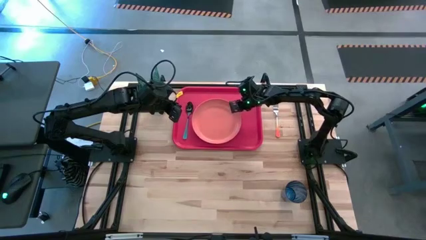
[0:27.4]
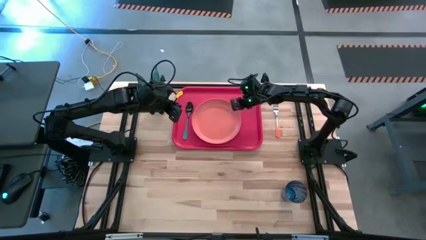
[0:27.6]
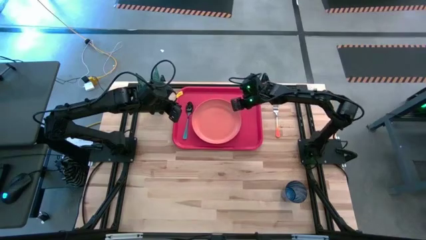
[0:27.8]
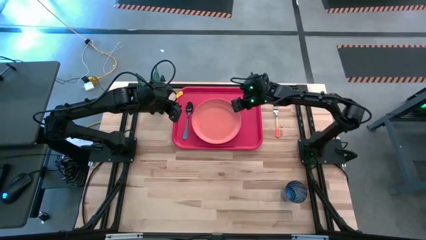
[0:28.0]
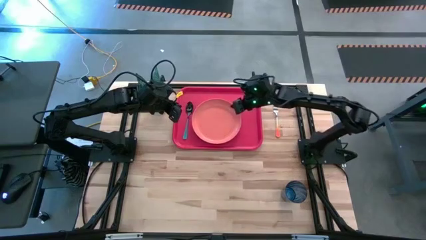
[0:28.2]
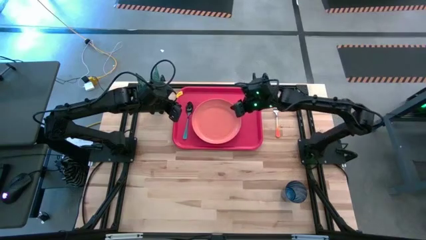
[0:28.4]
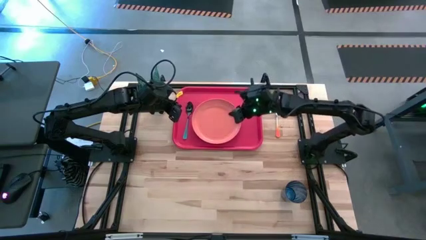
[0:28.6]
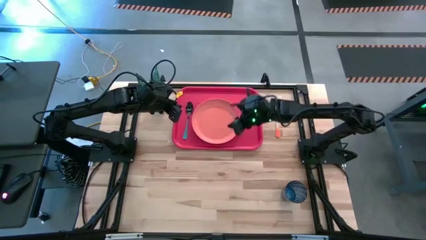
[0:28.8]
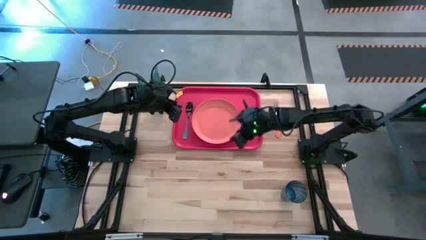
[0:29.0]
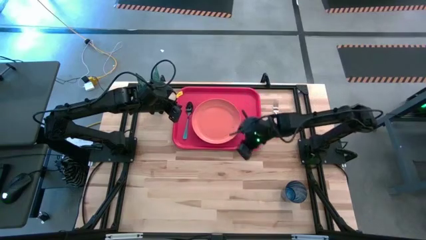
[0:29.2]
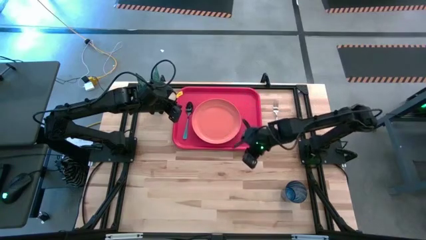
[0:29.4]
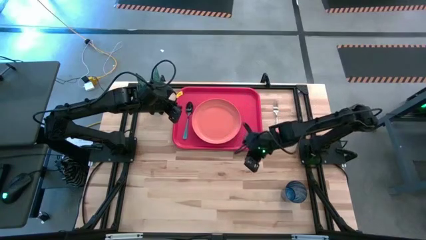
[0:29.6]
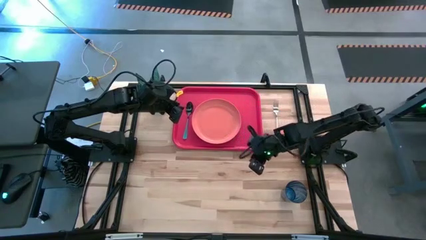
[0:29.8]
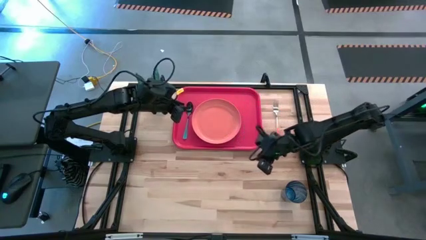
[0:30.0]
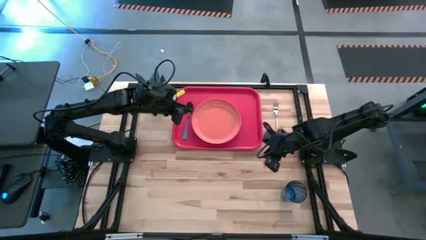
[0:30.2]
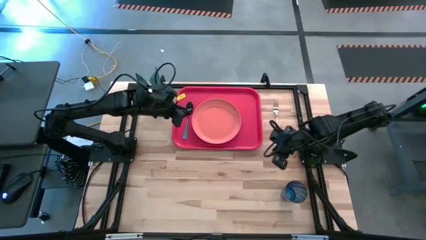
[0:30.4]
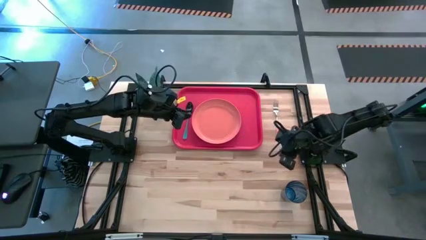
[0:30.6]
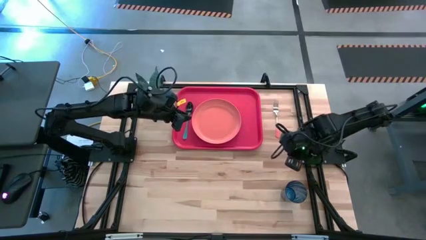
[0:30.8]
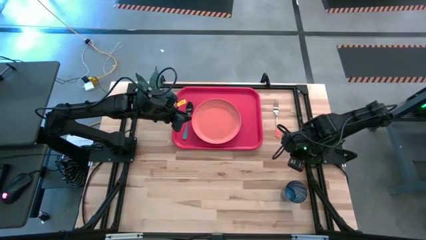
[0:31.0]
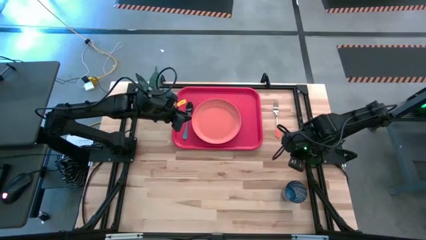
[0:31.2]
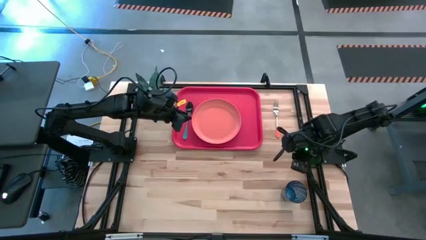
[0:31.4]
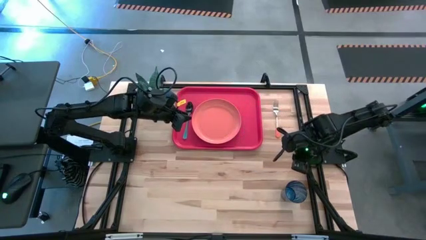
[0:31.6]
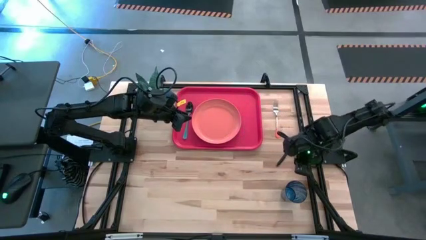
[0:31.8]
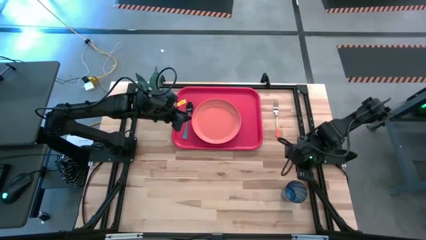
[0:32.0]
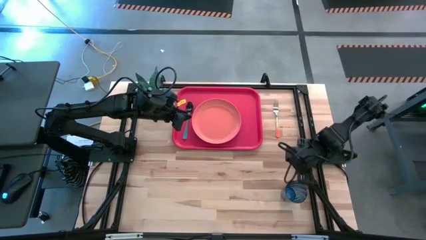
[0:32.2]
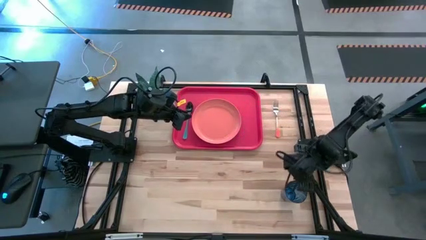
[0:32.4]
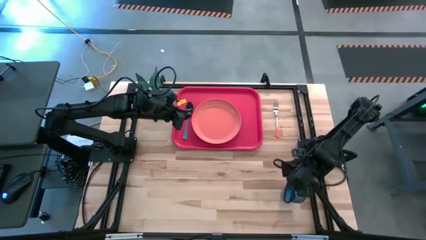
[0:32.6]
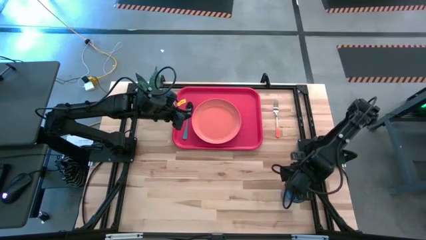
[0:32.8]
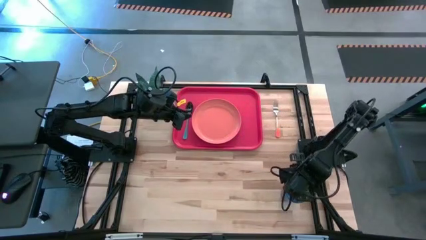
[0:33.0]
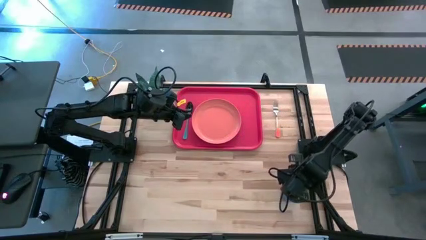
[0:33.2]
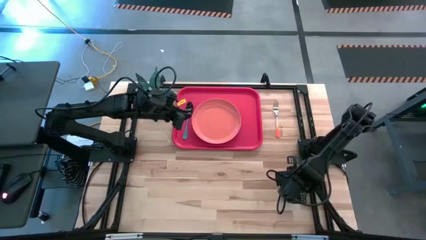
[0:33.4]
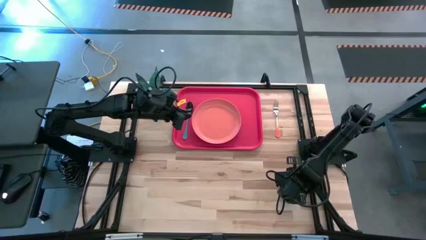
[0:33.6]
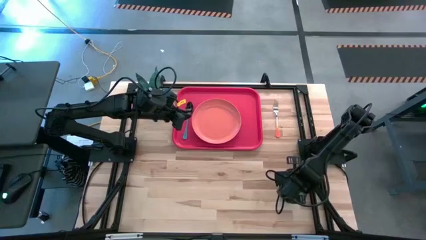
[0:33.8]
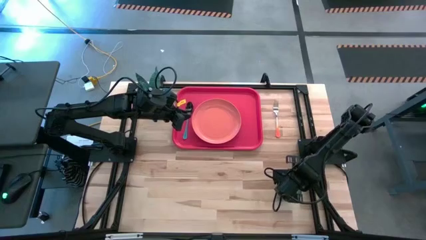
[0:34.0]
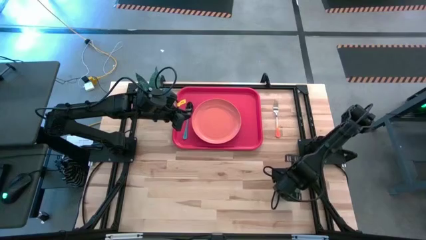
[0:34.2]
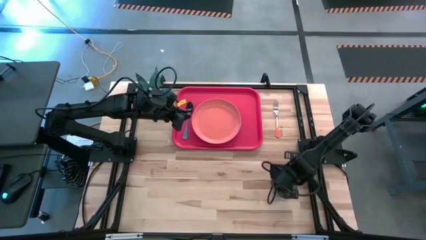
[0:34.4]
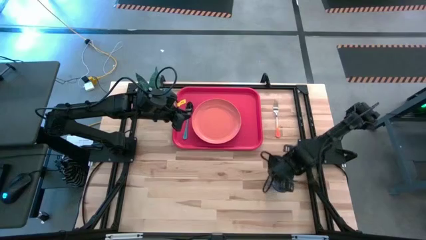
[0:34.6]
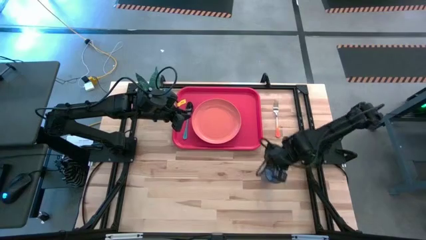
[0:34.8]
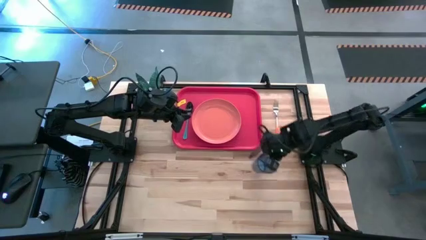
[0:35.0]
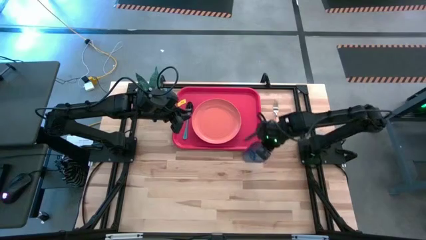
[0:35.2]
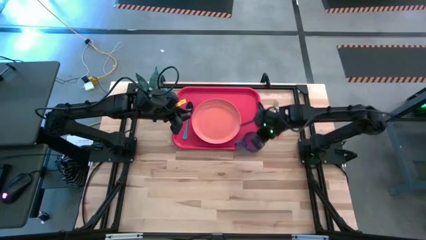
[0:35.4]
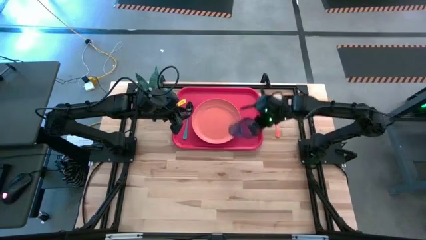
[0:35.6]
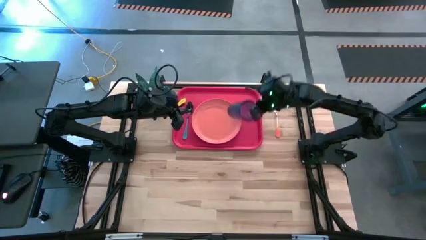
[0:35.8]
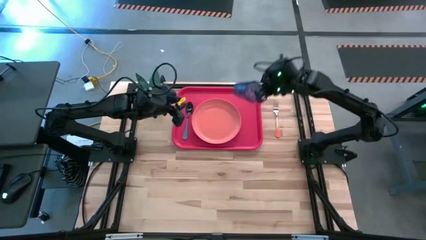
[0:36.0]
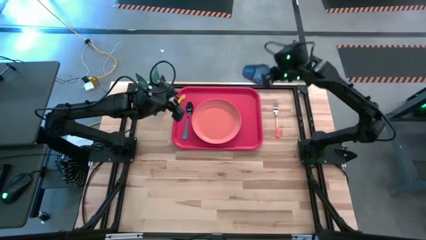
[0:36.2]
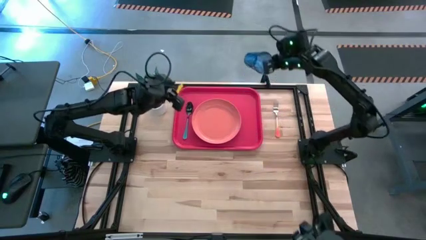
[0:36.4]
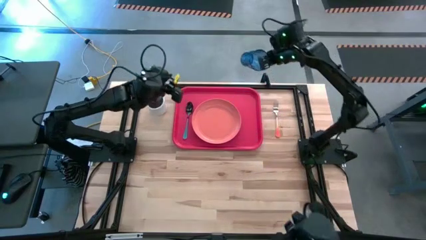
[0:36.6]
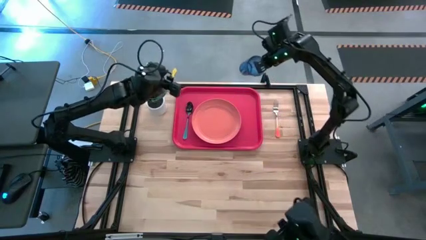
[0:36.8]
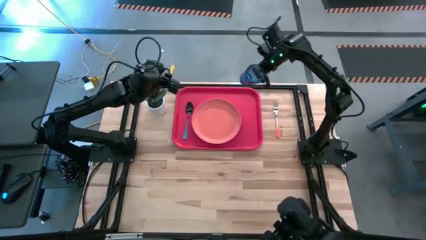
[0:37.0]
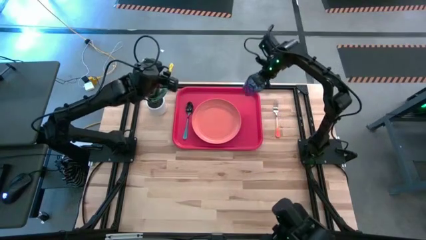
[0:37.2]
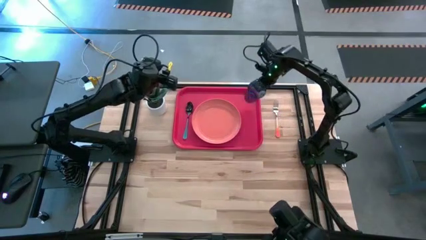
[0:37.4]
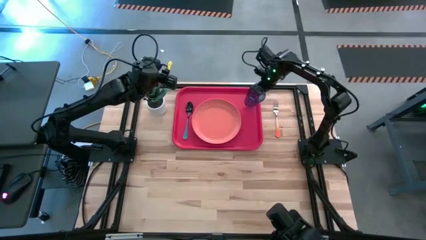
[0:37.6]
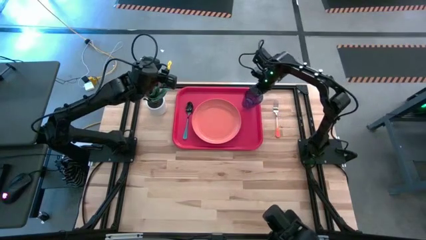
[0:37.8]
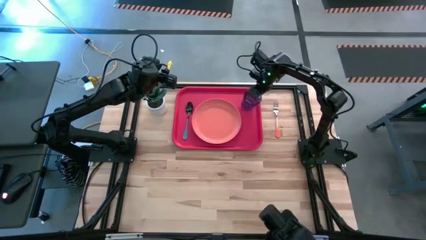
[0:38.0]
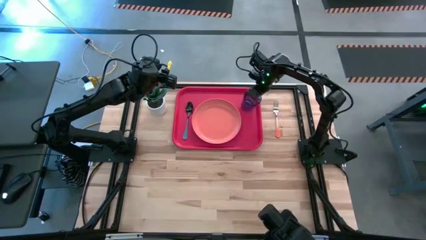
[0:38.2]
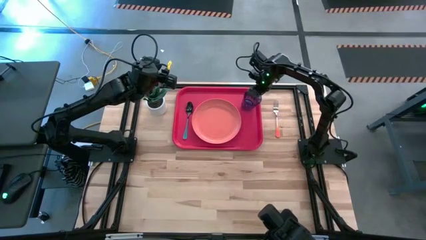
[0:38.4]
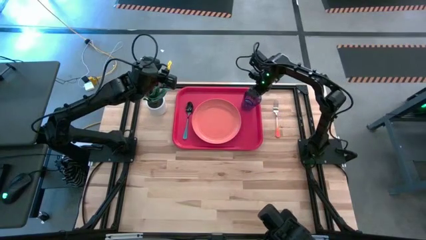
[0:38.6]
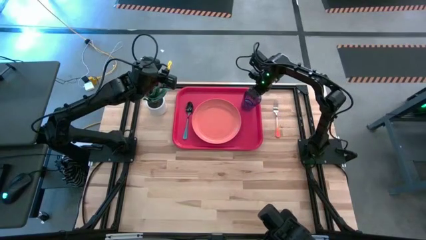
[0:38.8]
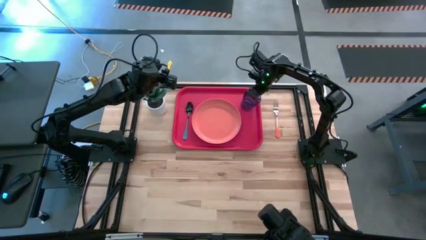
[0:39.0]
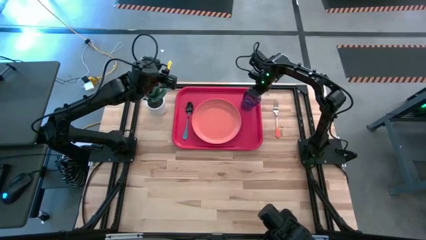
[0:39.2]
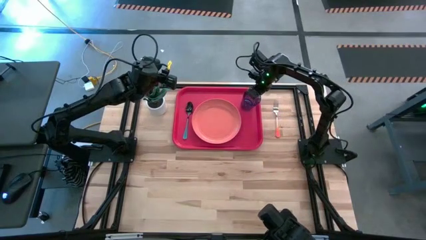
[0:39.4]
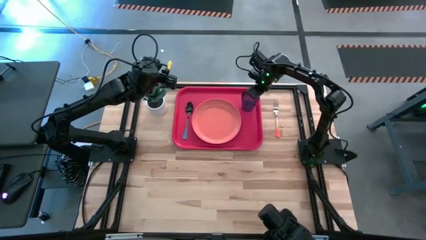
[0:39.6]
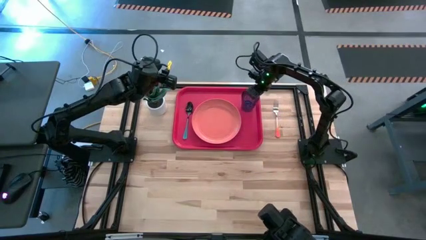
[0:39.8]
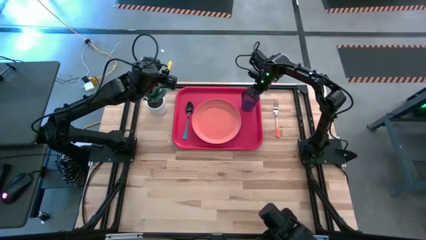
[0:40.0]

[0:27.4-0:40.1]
Task: Pick and place plate/cup/fork/spoon on tray
Put the blue glass on top right of the pink tray

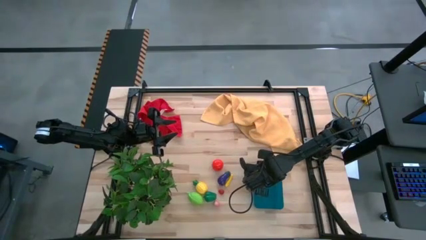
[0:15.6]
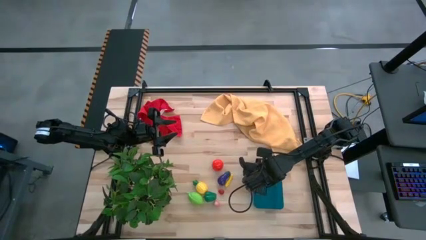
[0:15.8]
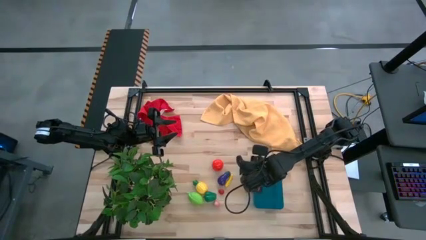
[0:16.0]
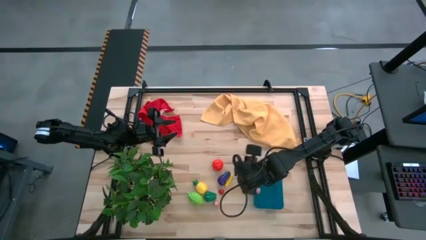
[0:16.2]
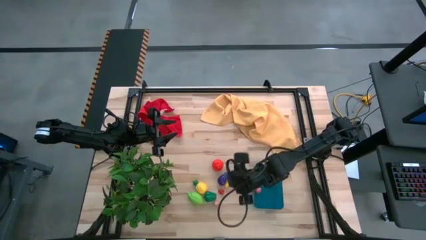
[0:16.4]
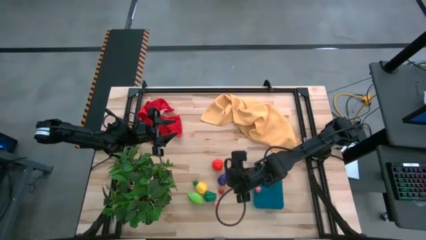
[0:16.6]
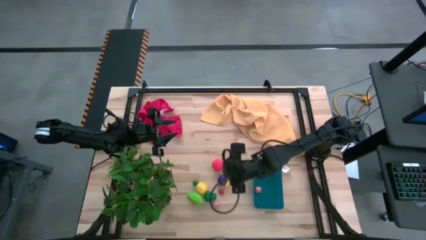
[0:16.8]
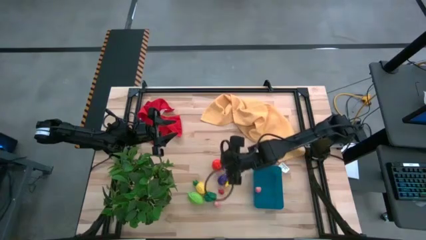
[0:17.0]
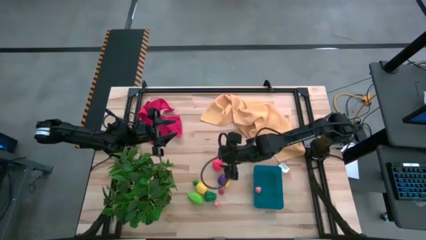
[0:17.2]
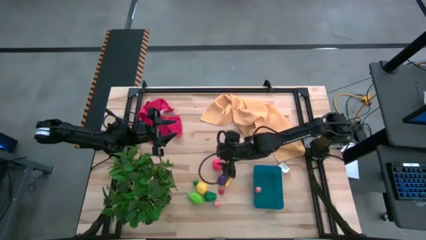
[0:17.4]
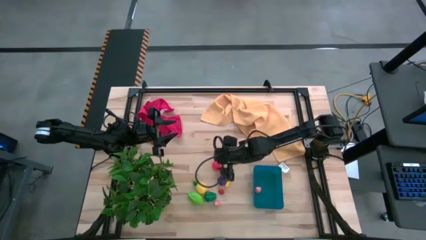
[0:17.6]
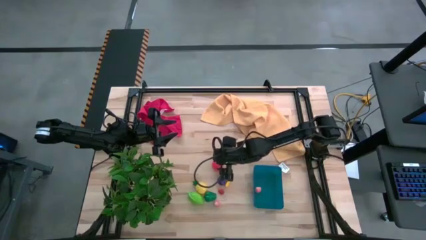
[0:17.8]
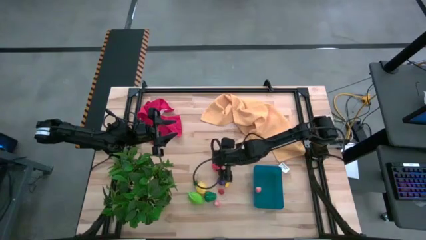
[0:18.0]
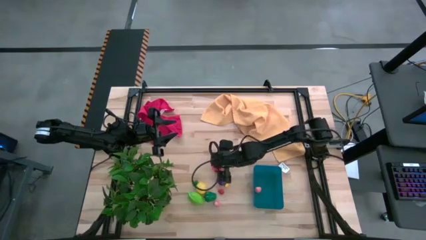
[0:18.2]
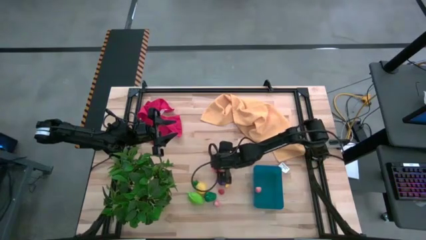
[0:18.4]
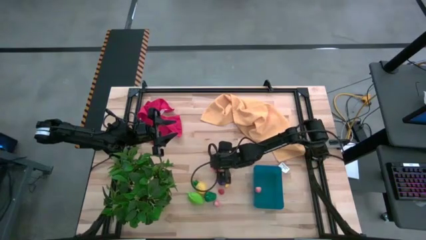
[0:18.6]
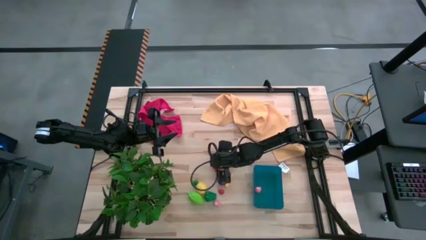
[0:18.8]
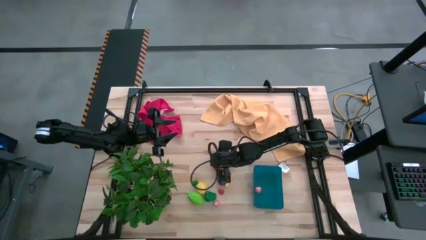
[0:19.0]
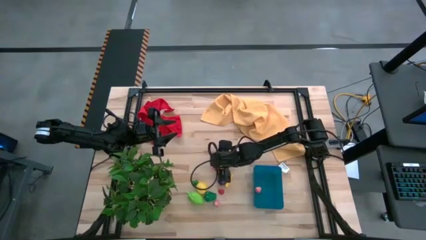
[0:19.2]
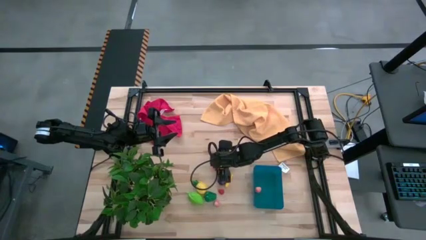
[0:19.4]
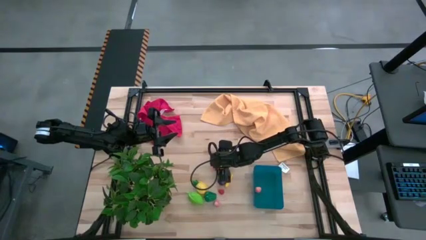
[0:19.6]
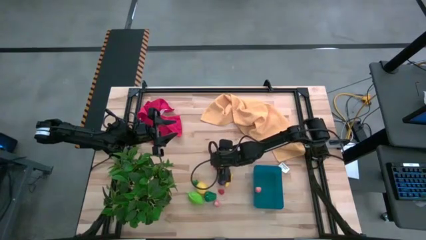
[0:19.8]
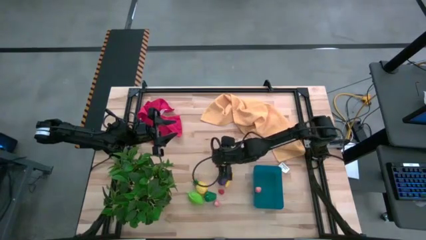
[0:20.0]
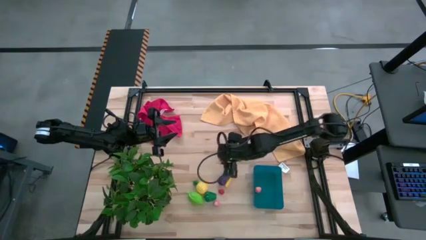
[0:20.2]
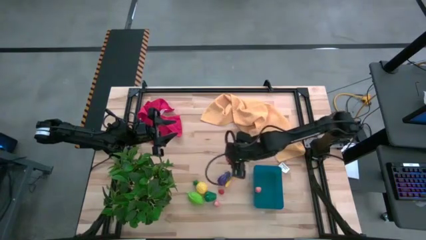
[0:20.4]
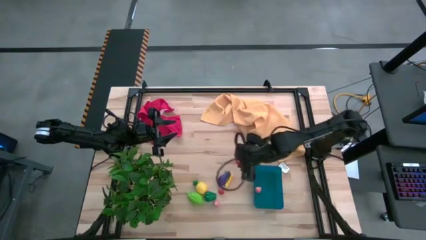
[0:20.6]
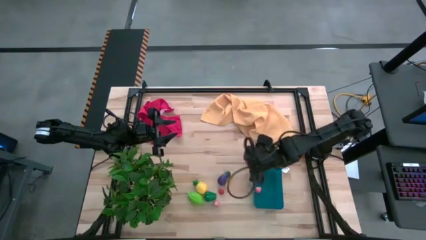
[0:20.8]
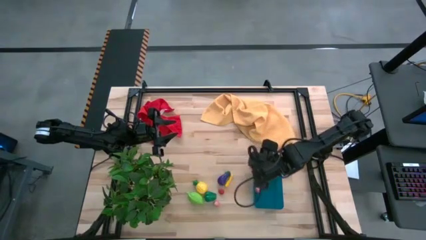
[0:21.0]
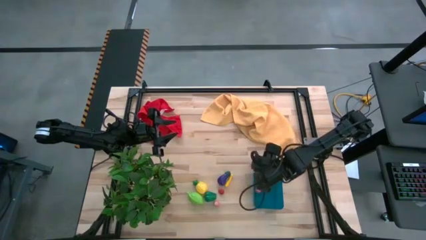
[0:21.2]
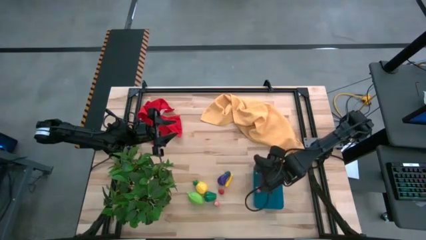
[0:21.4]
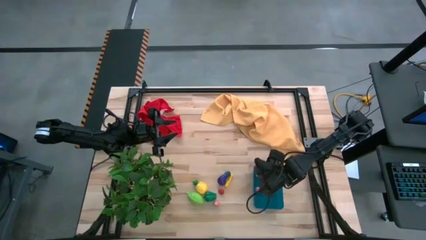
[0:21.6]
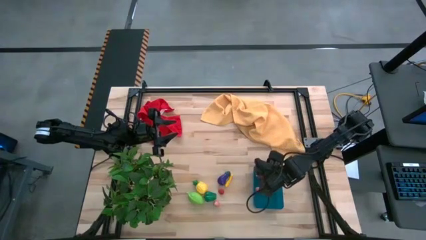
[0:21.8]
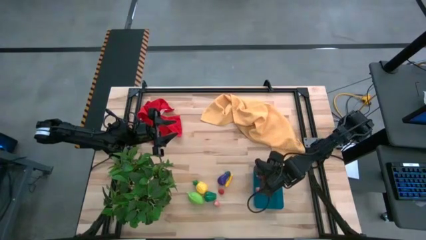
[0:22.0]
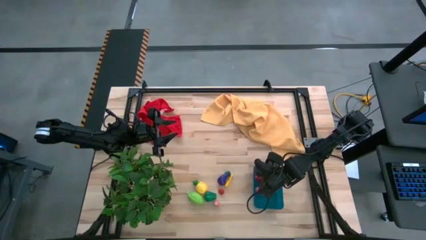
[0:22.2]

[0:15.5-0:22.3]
Task: Pick and placing Produce into tupperware
Put the red tomato into the blue bin
